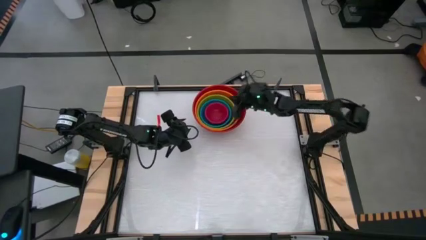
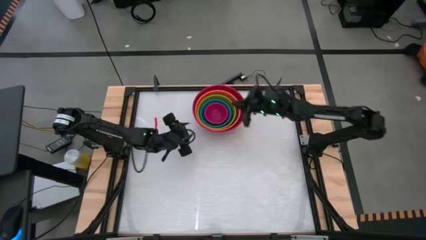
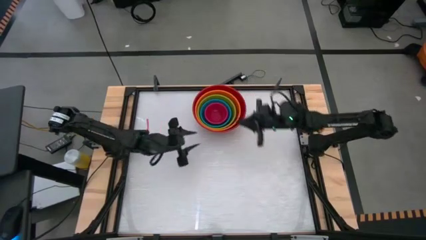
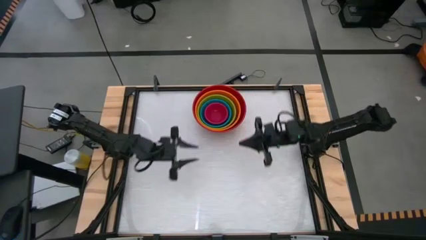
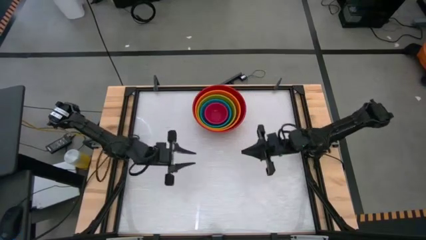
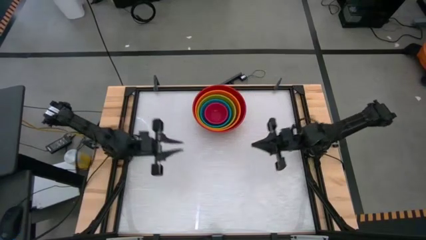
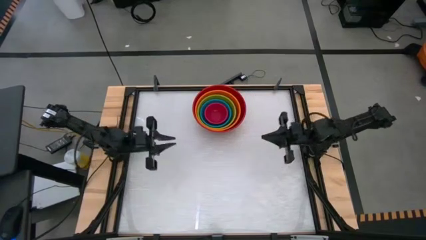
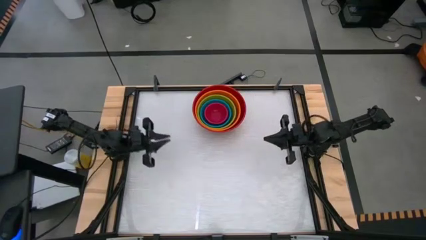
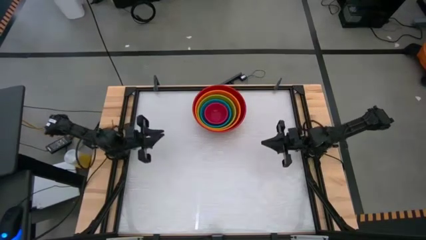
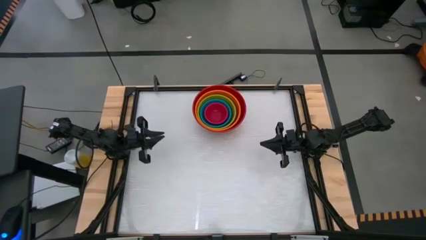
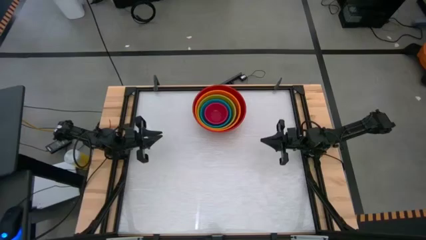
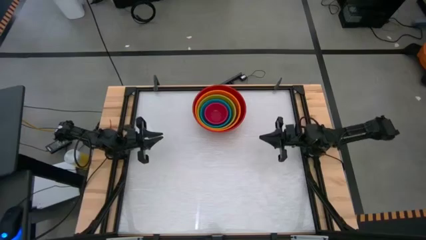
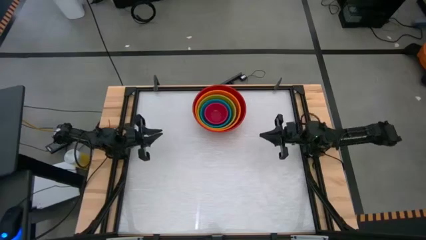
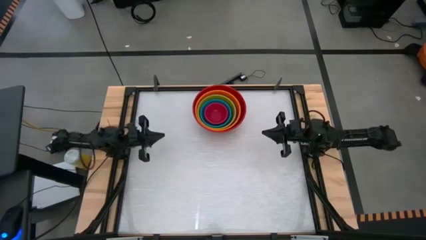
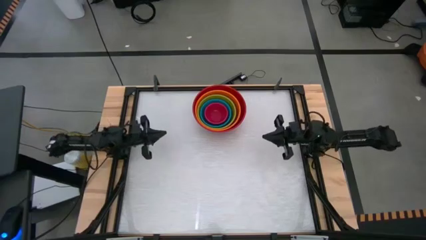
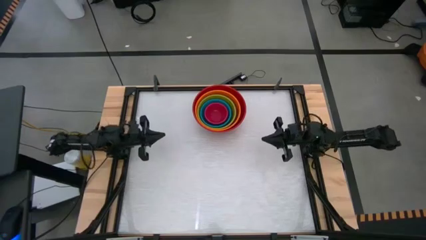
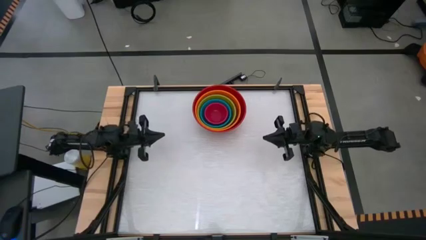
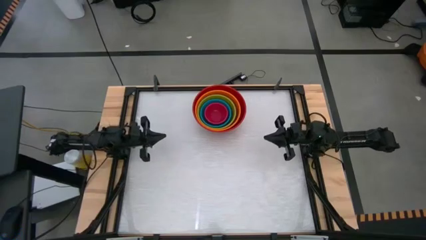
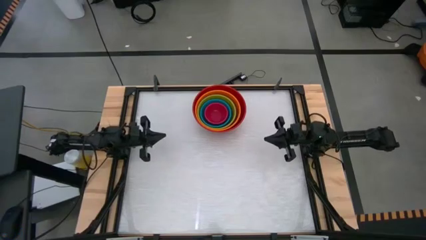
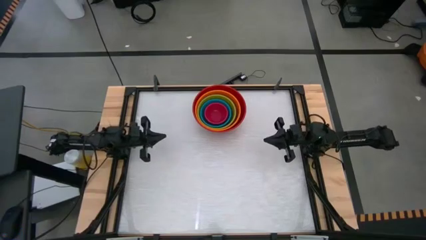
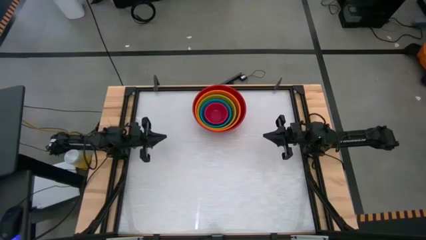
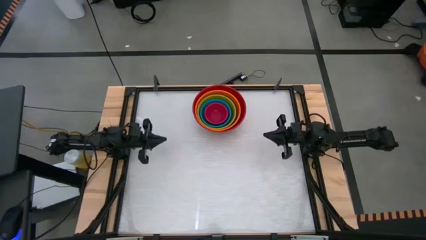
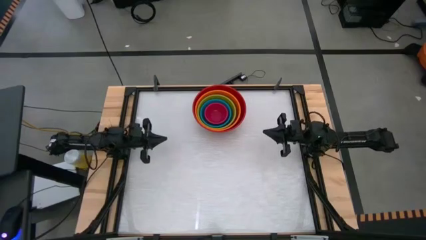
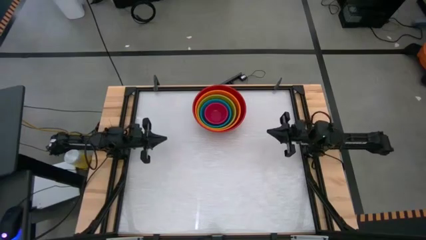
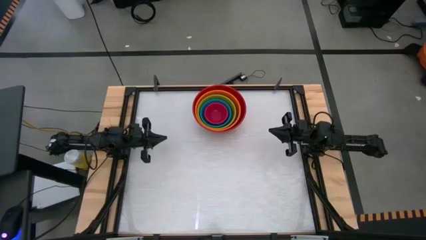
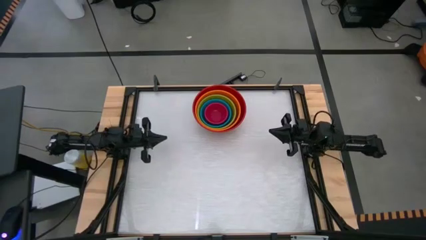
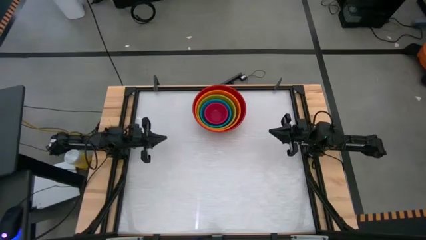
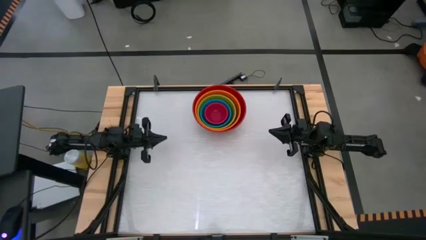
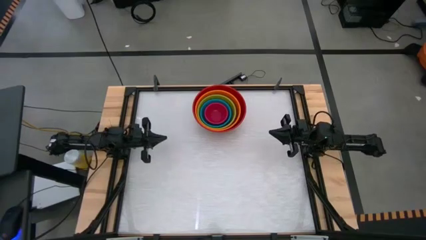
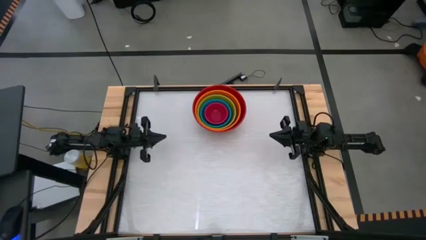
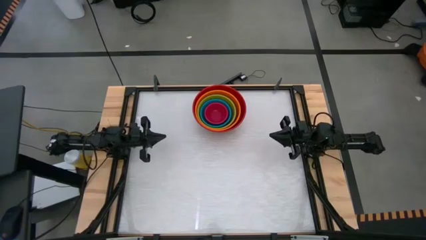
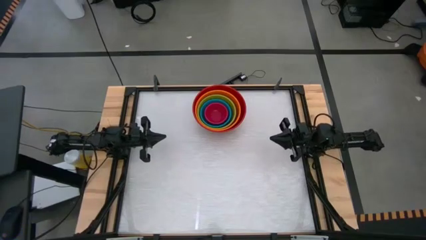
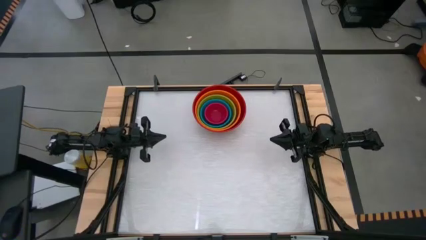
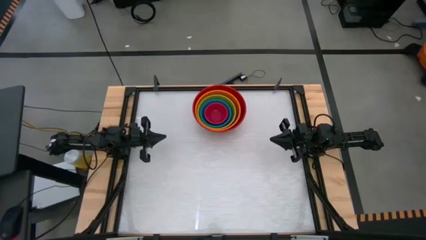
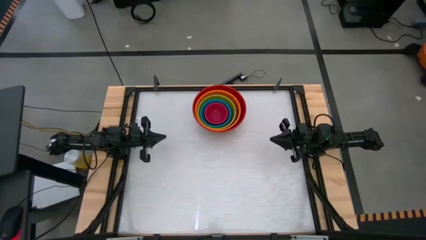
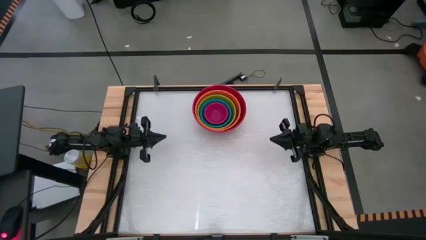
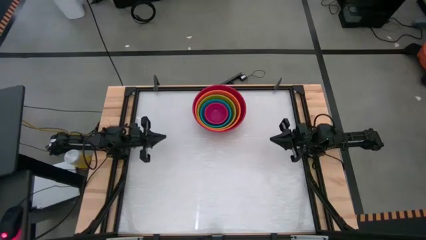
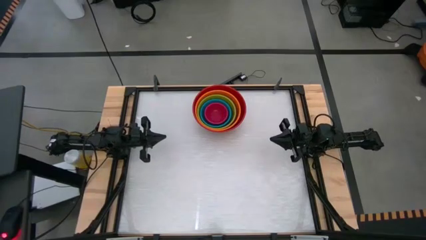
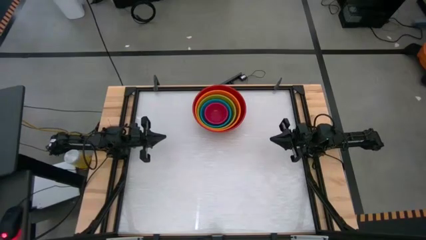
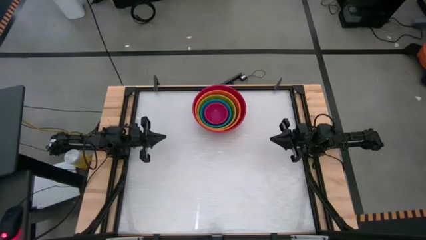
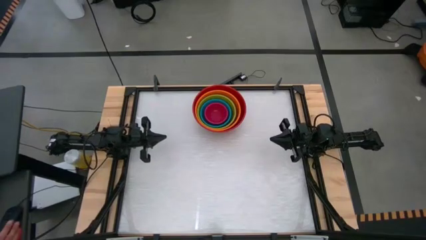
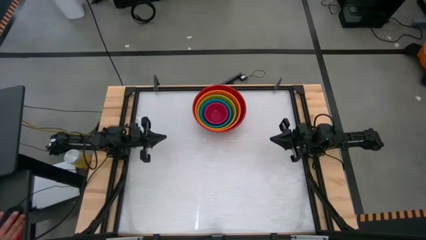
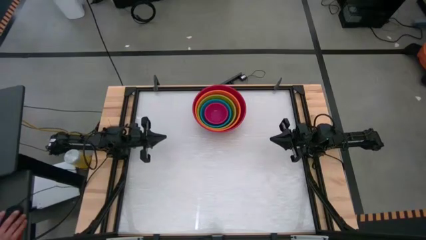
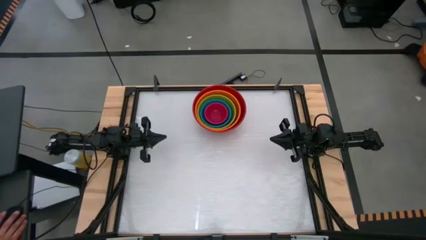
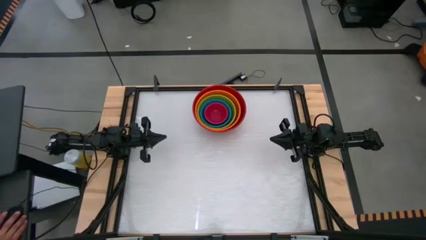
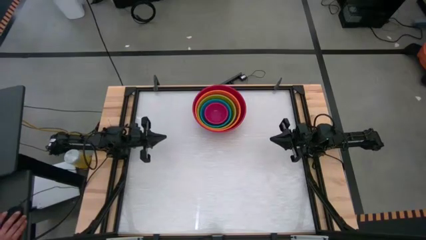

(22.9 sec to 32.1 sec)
Return to Home Position

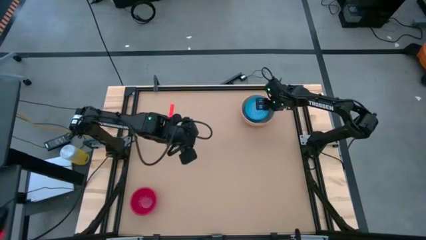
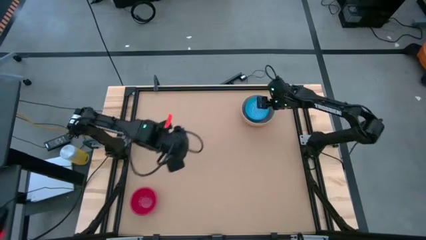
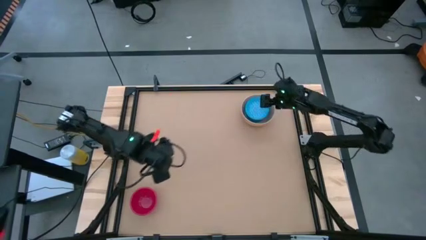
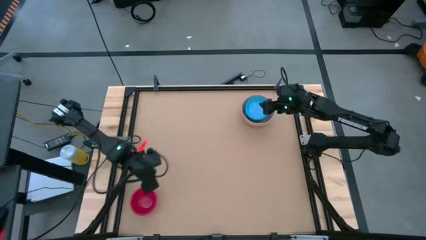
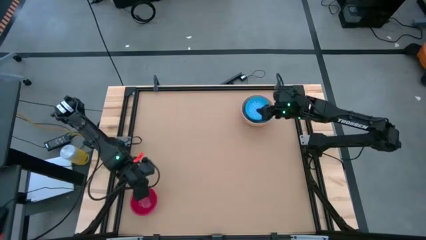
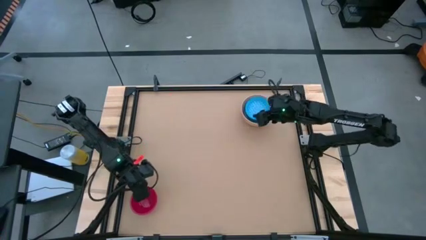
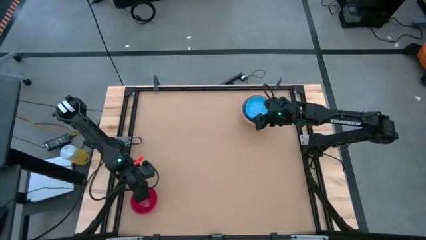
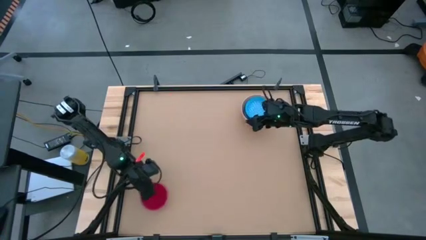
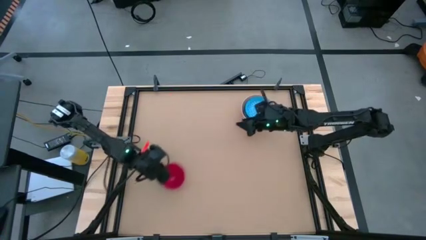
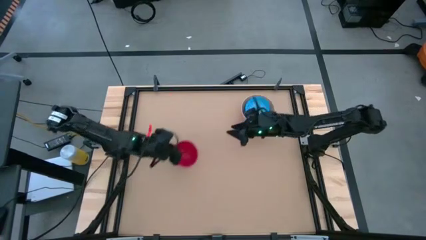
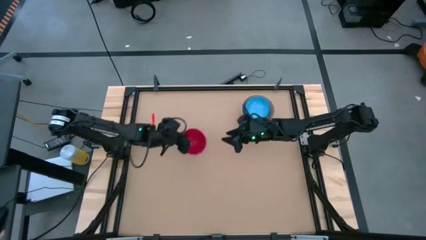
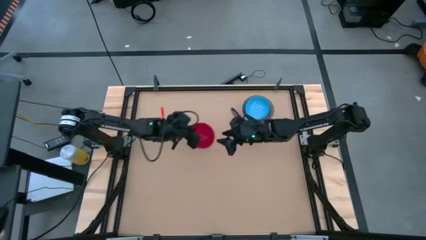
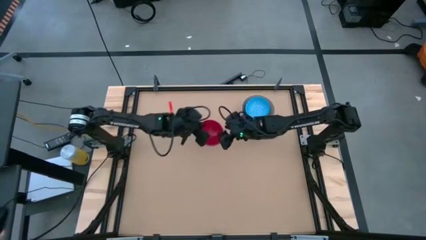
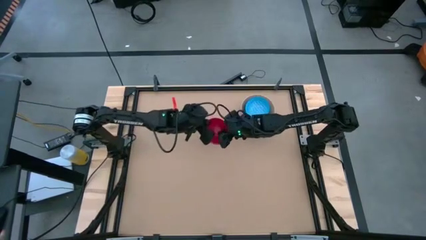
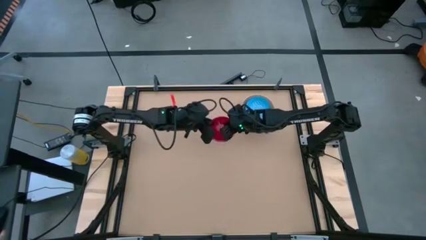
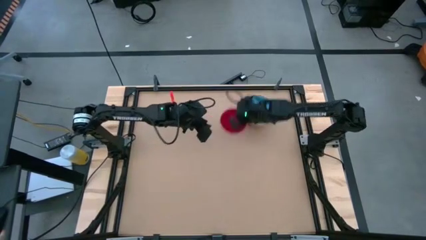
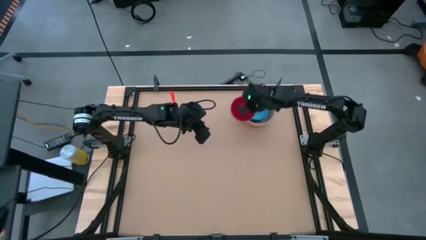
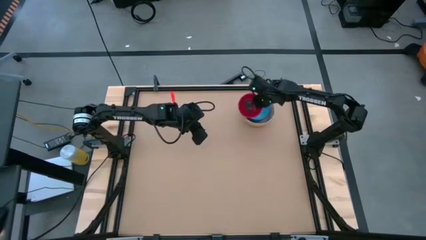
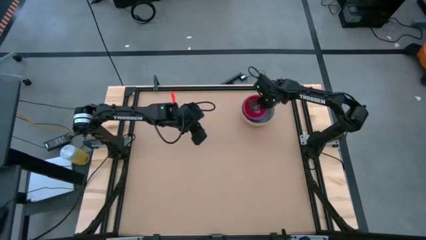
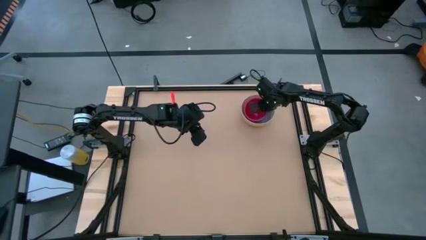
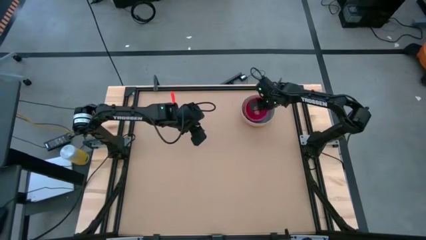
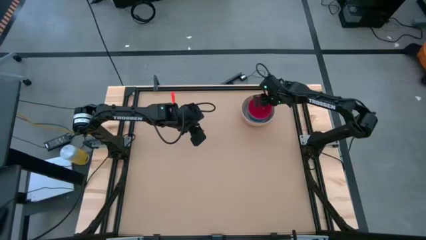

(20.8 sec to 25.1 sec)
Stack the red bowl on top of the blue patterned bowl
